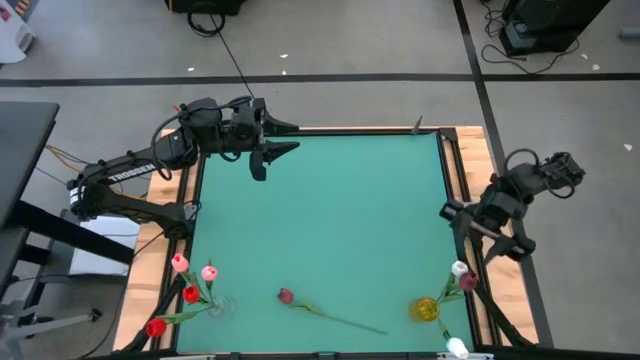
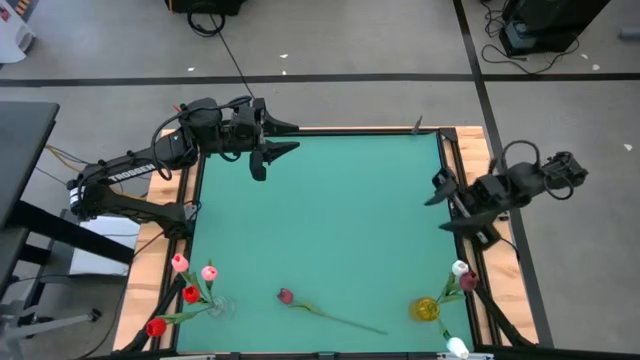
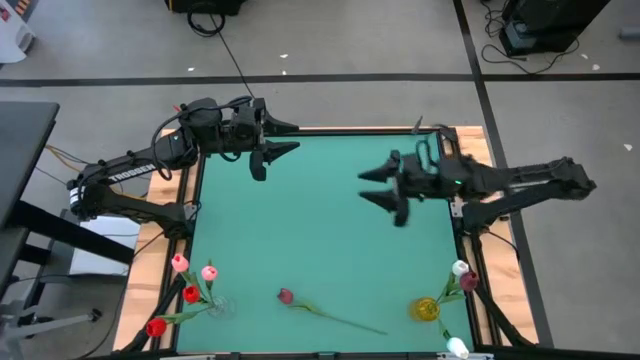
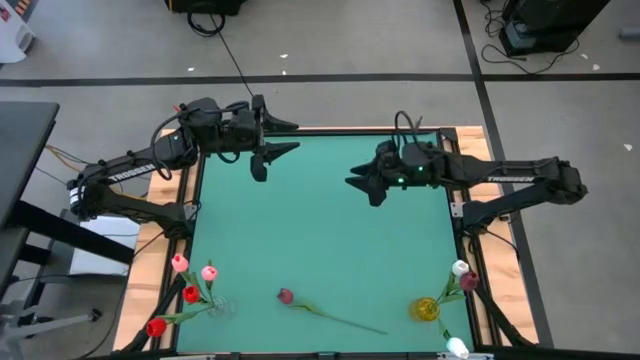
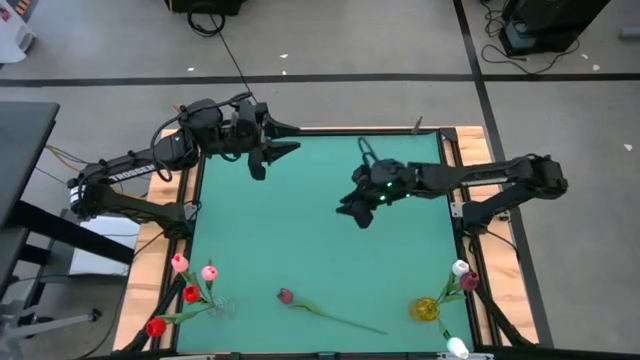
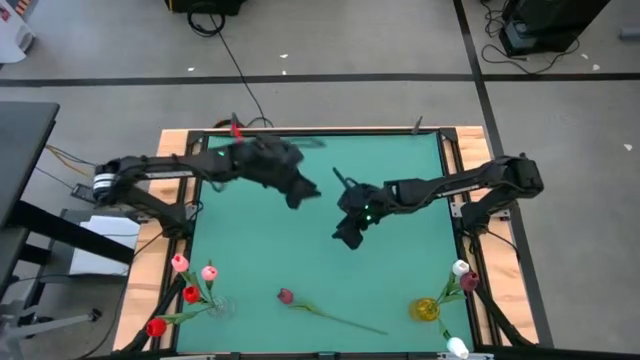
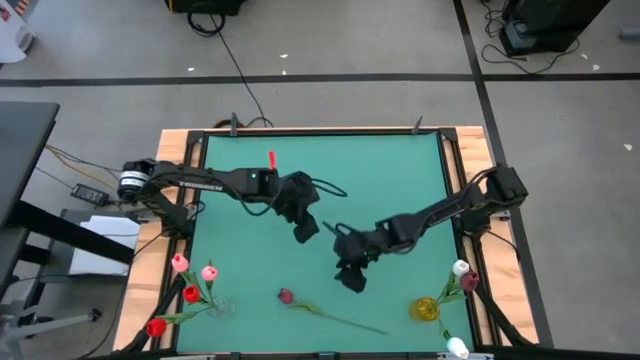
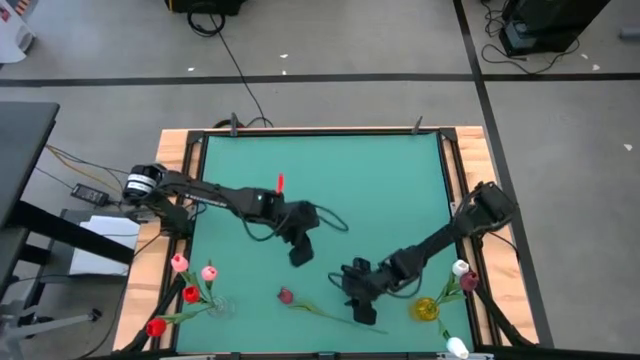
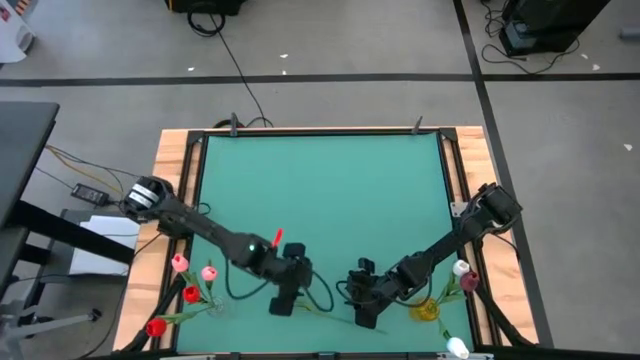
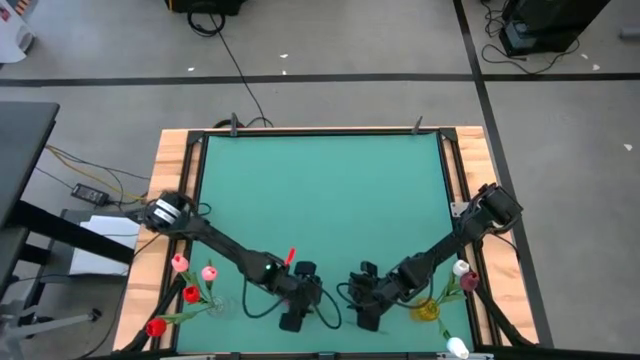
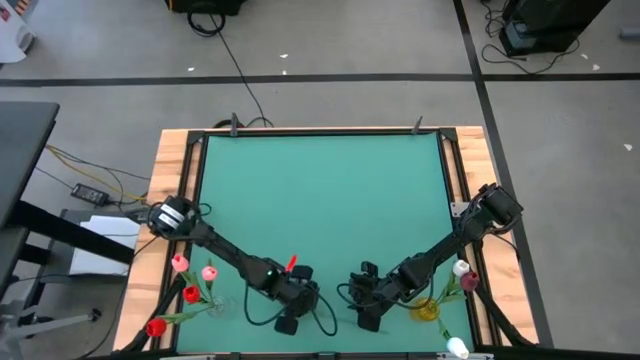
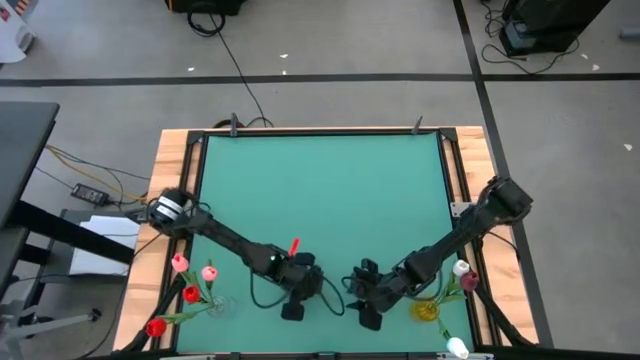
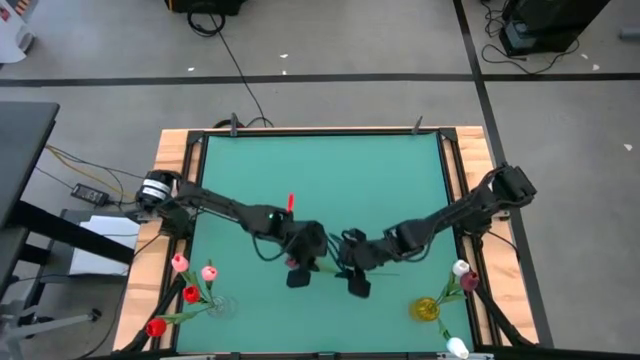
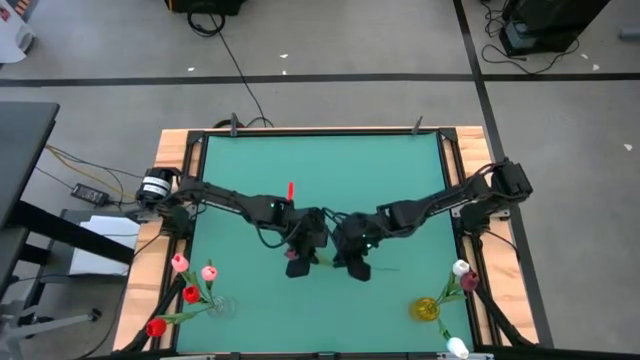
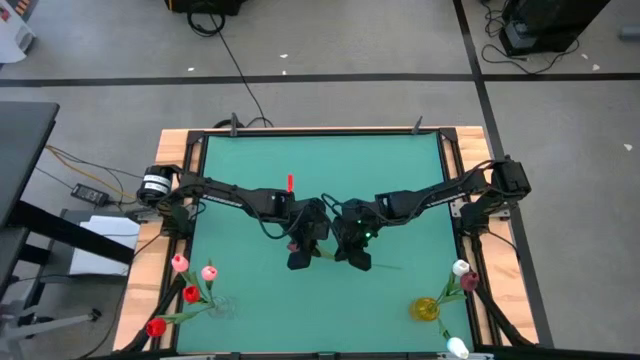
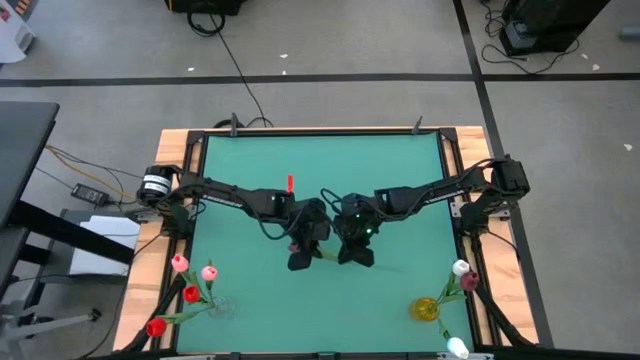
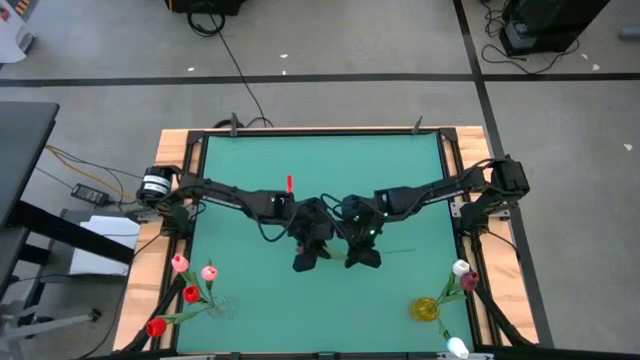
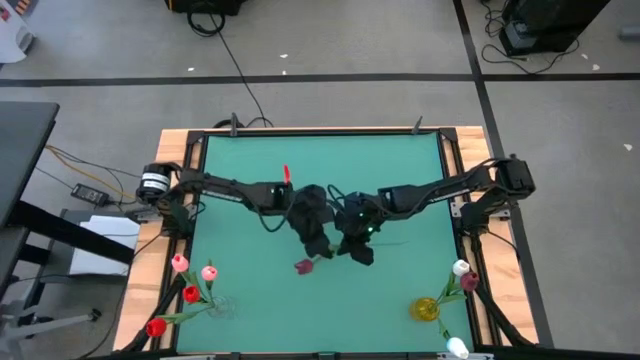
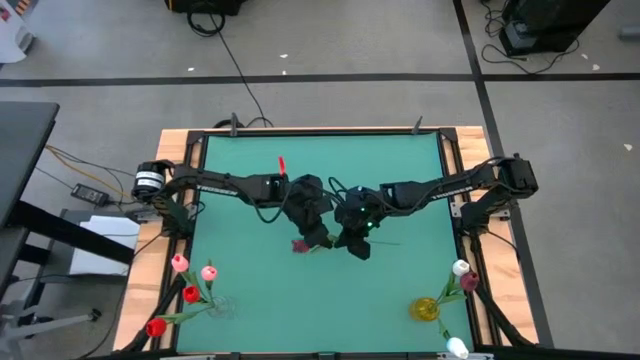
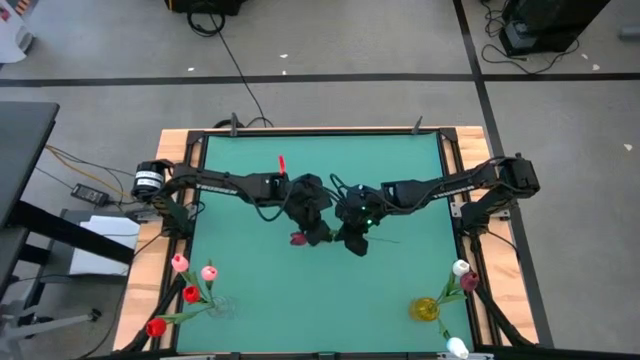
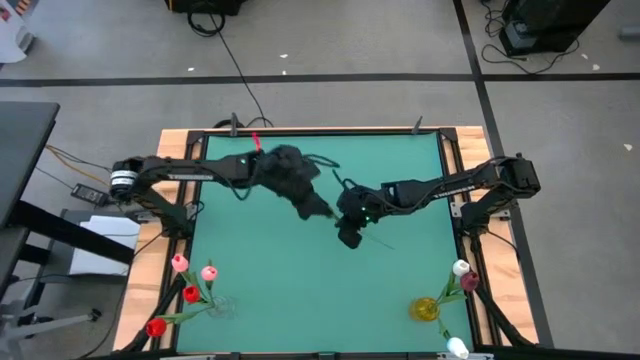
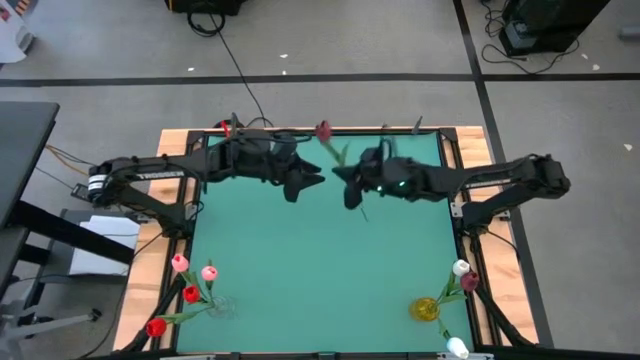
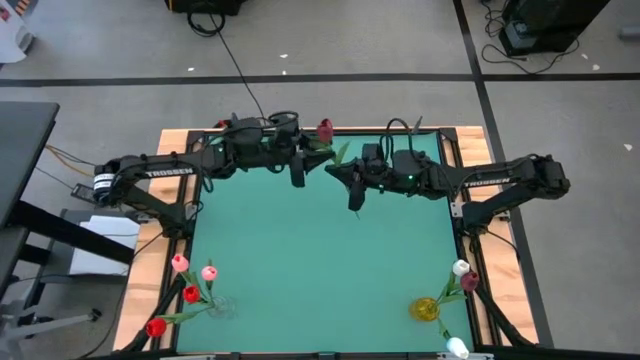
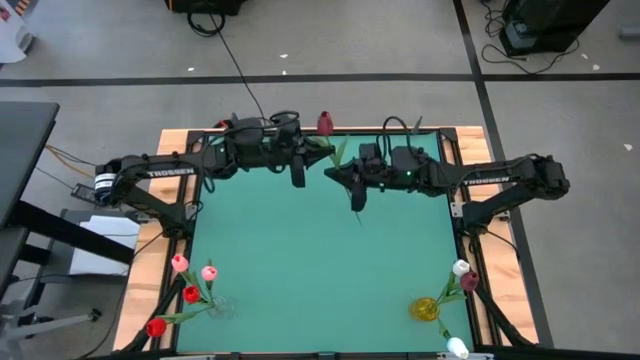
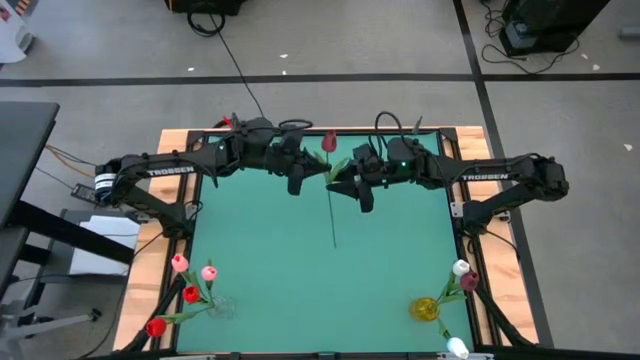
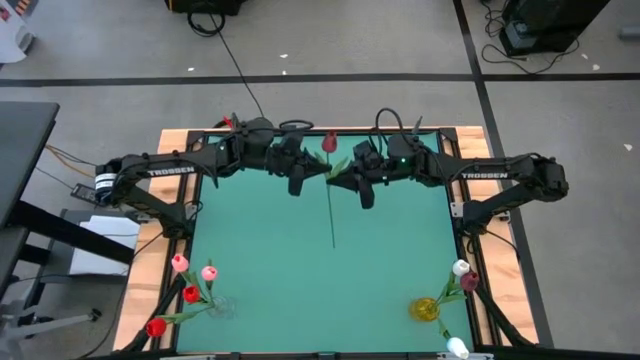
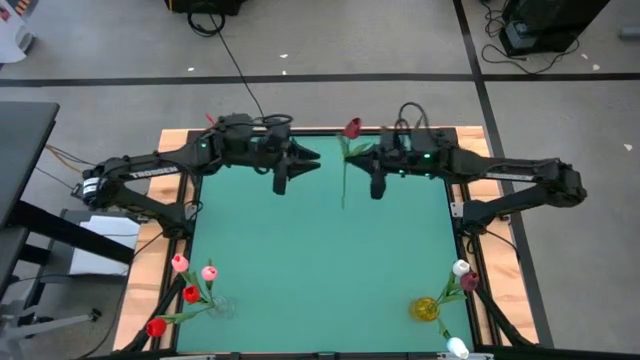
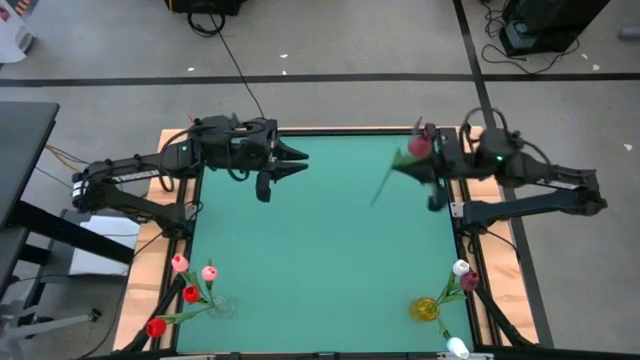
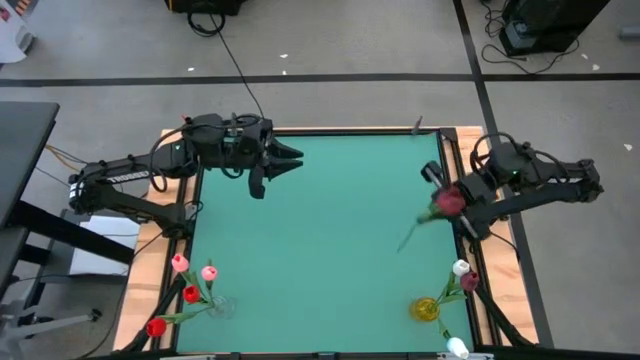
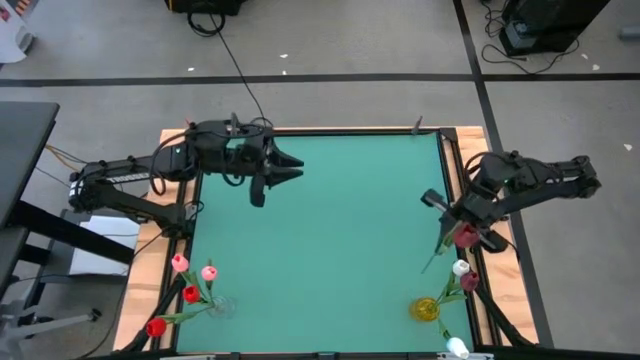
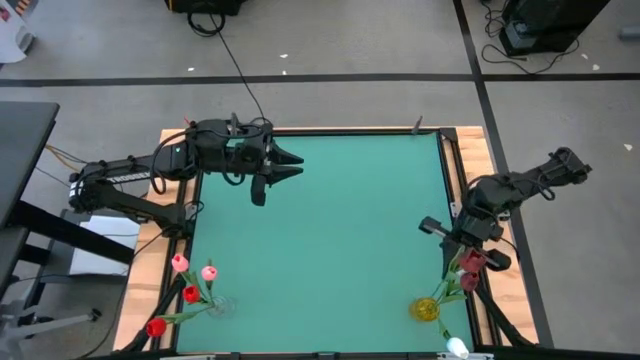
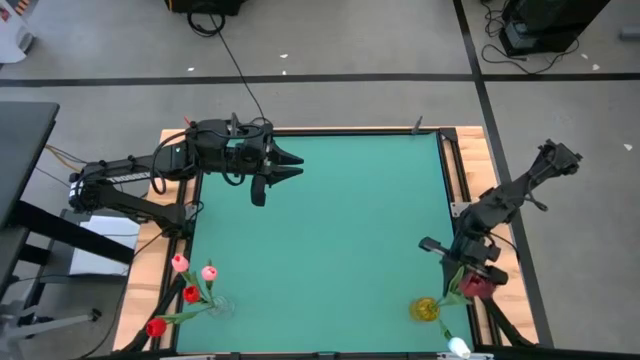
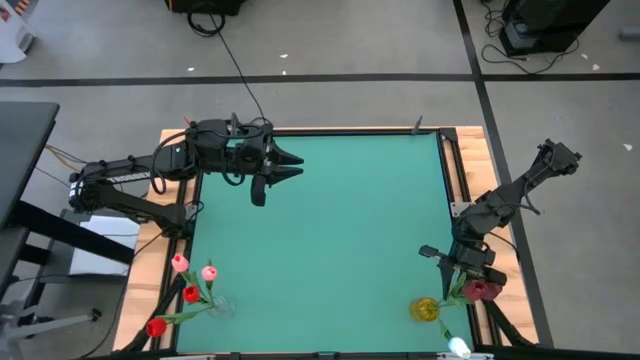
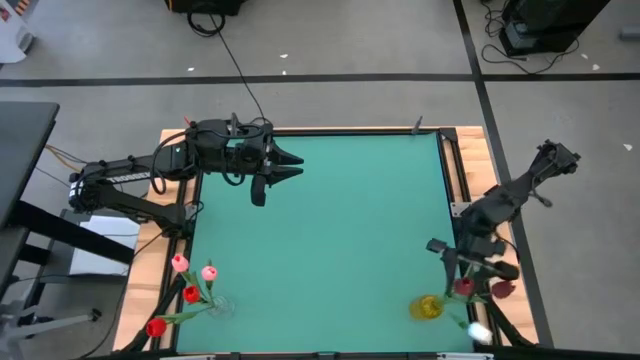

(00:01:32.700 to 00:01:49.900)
Task: Sort flowers into vase by color
Put the dark red flower into the yellow transparent vase

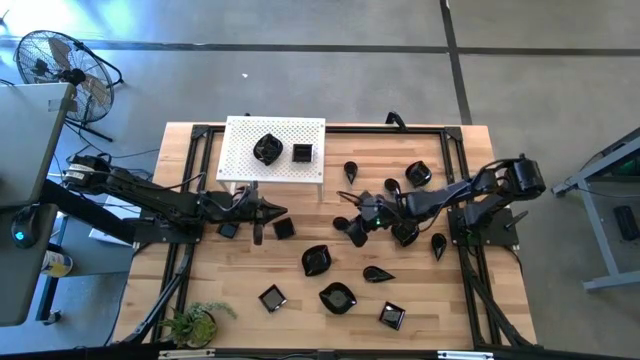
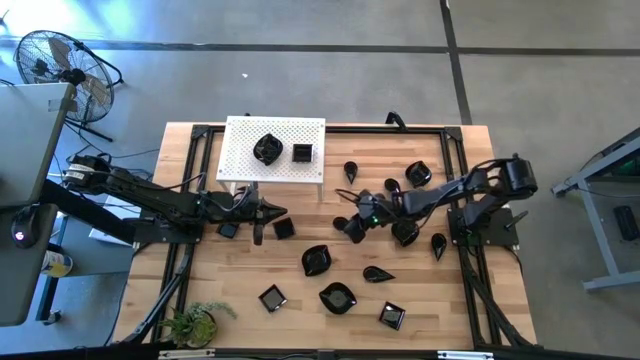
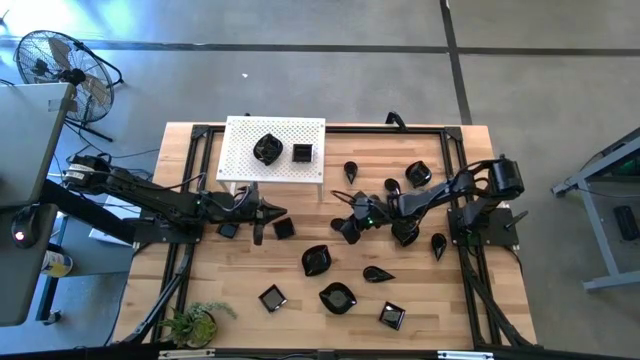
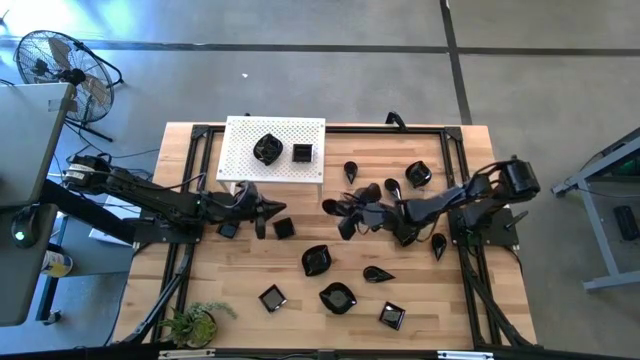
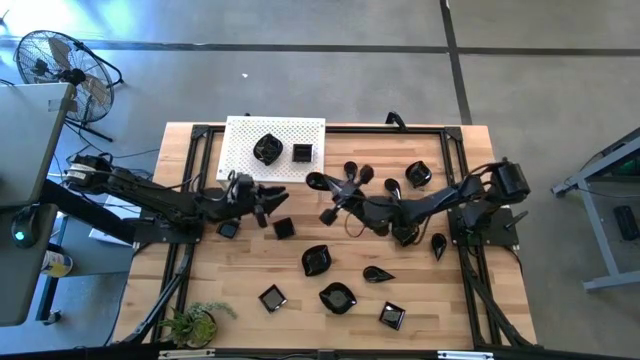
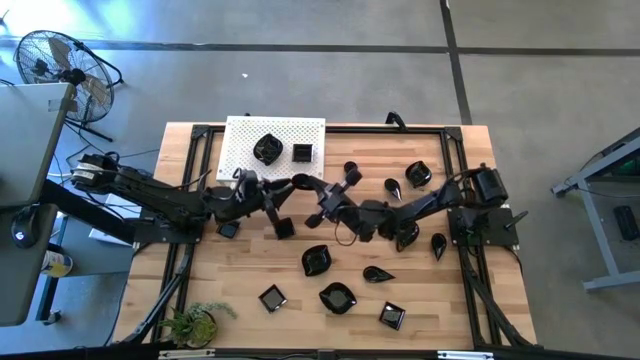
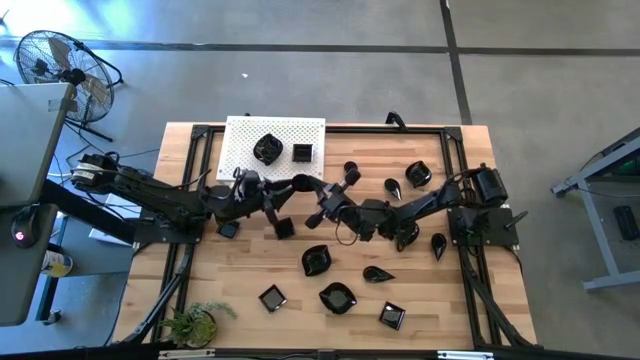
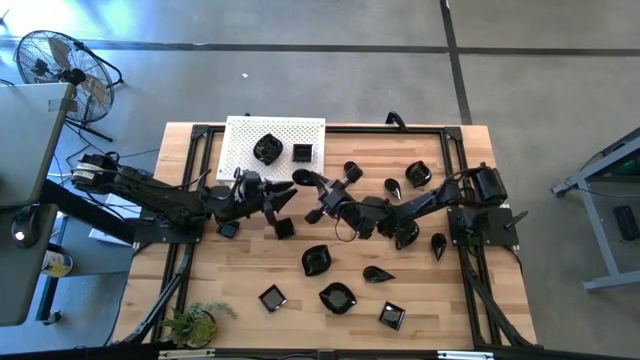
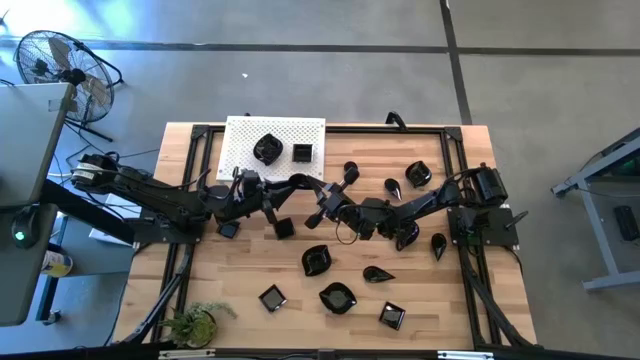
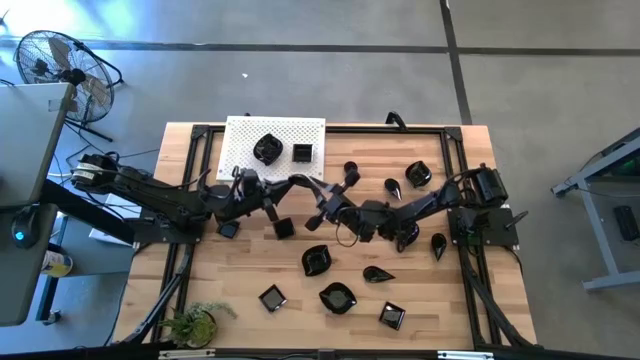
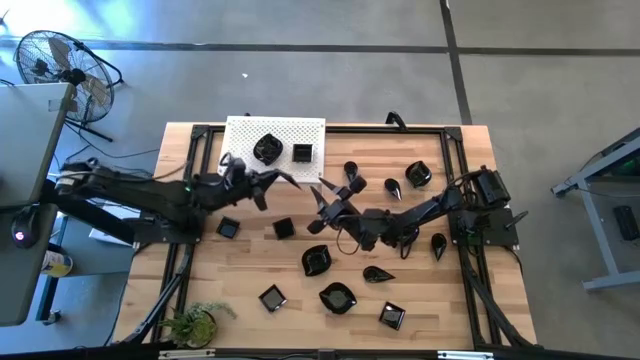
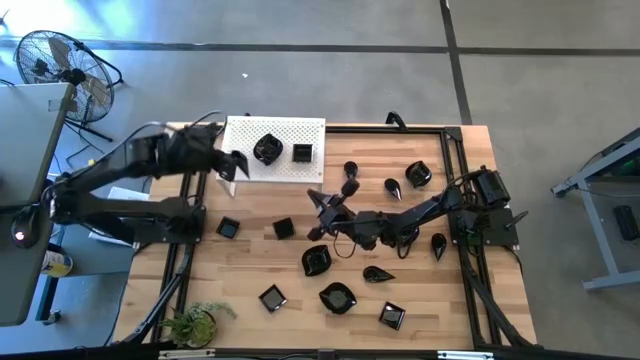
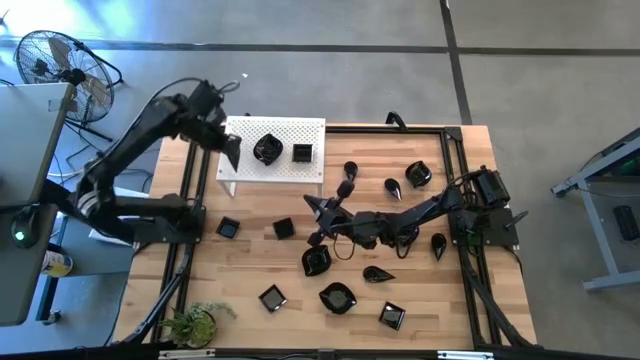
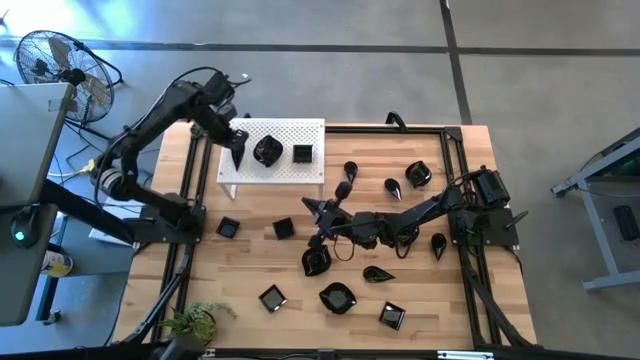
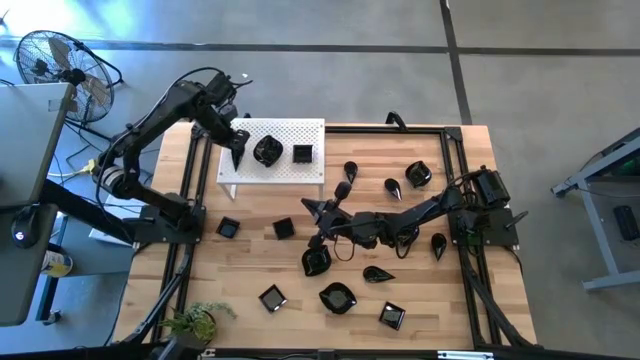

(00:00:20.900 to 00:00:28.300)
Task: Pick & Place Mini shaped plates
Put the teardrop-shaped plate on the shelf
